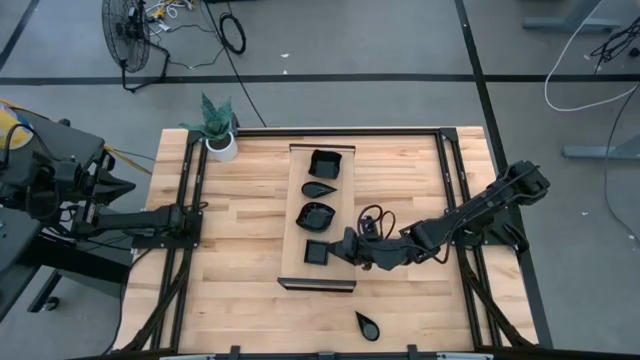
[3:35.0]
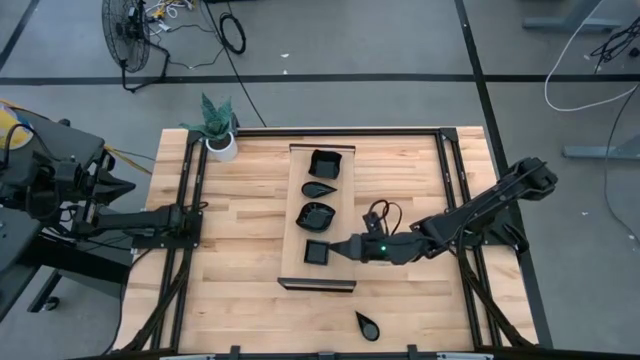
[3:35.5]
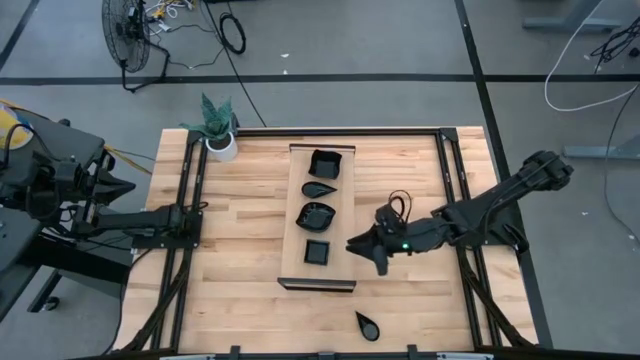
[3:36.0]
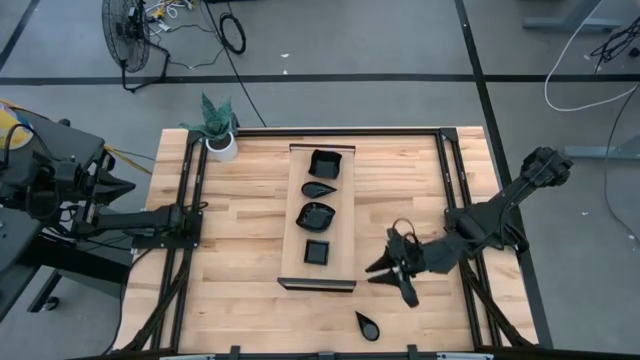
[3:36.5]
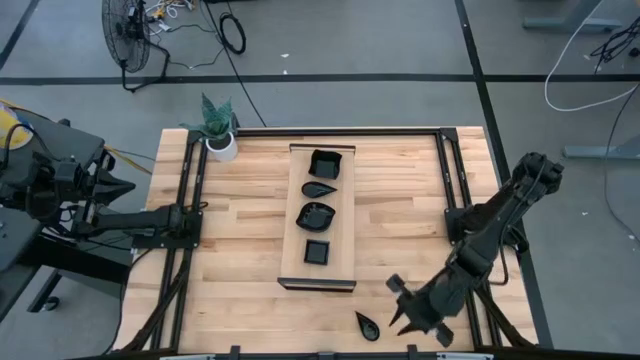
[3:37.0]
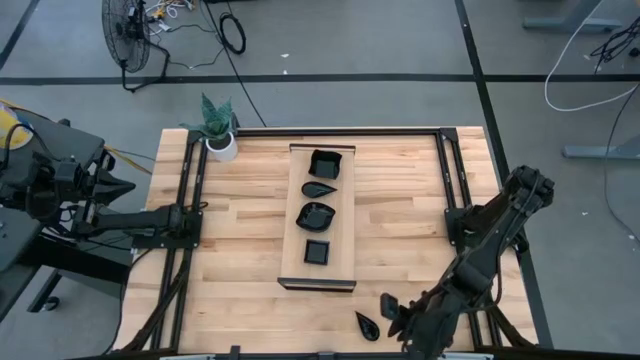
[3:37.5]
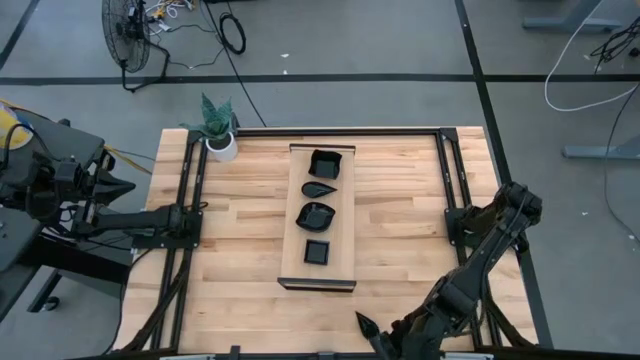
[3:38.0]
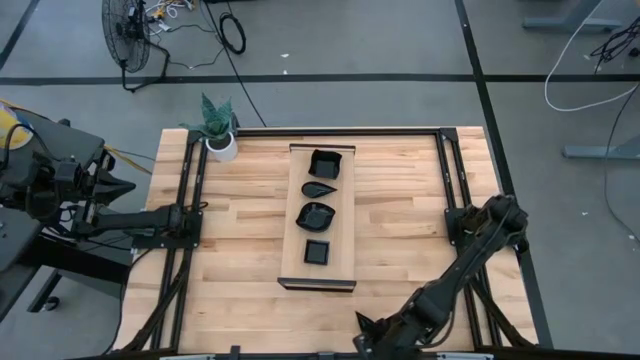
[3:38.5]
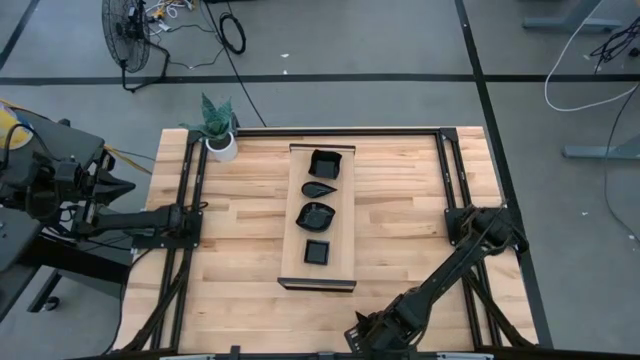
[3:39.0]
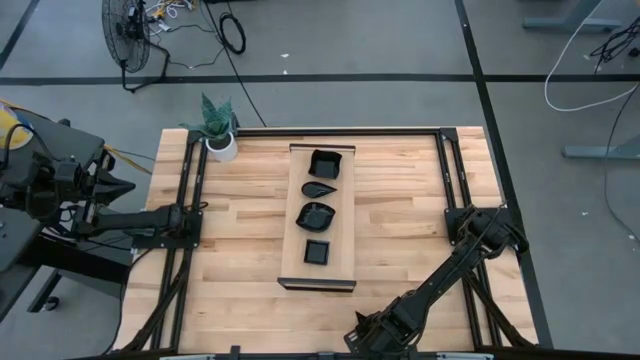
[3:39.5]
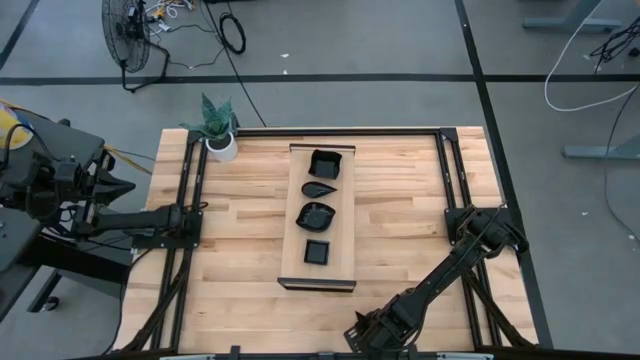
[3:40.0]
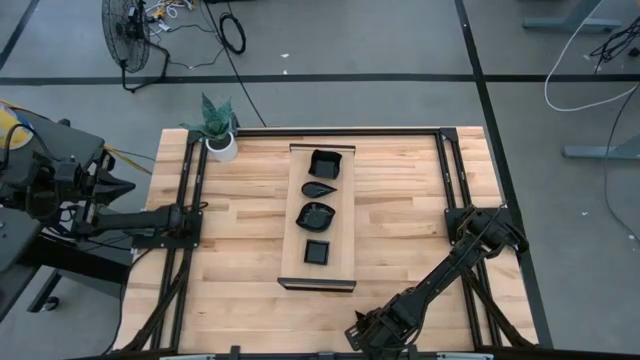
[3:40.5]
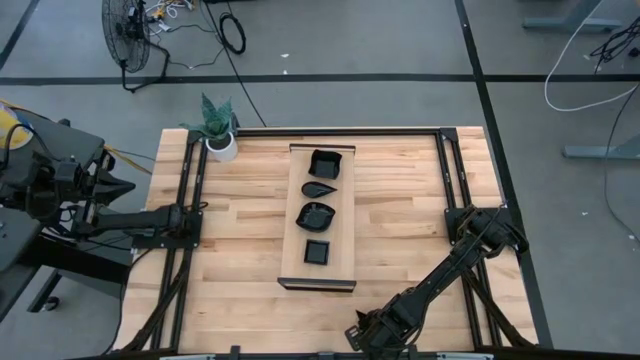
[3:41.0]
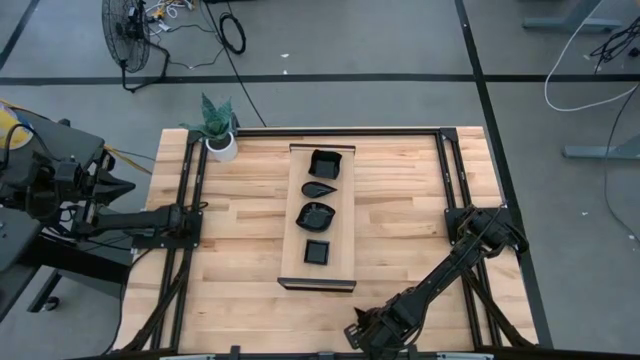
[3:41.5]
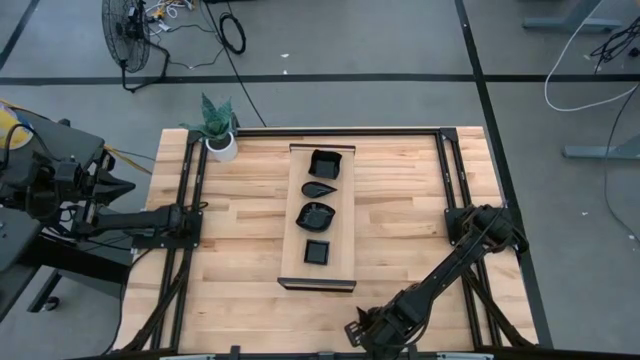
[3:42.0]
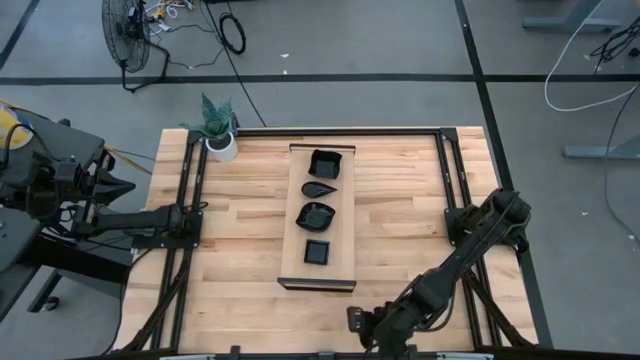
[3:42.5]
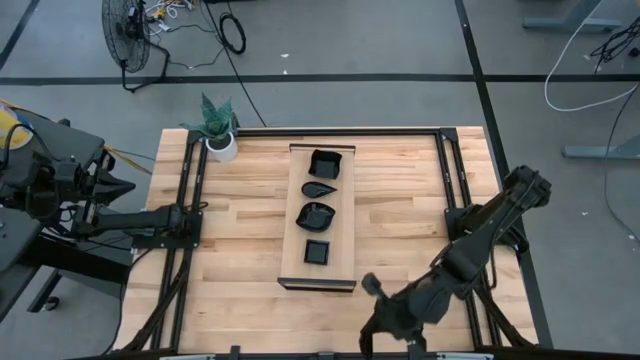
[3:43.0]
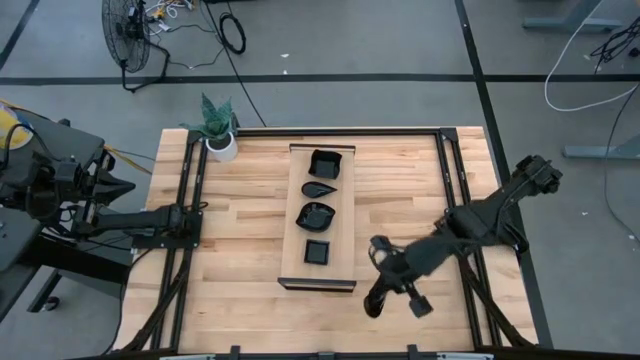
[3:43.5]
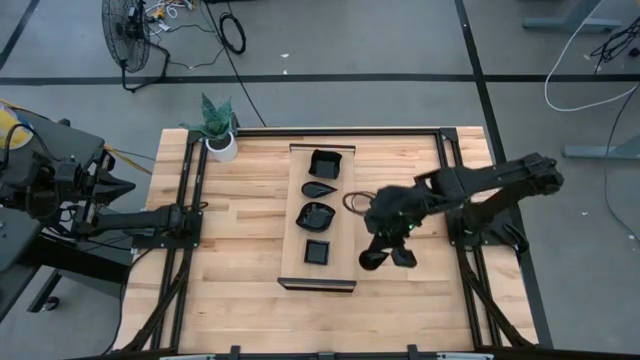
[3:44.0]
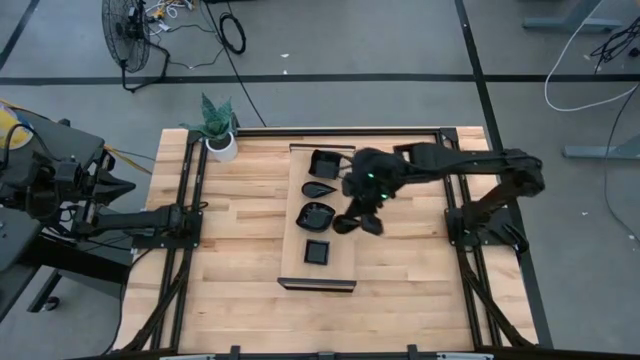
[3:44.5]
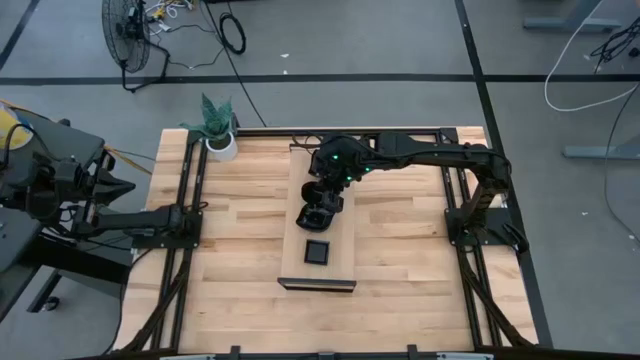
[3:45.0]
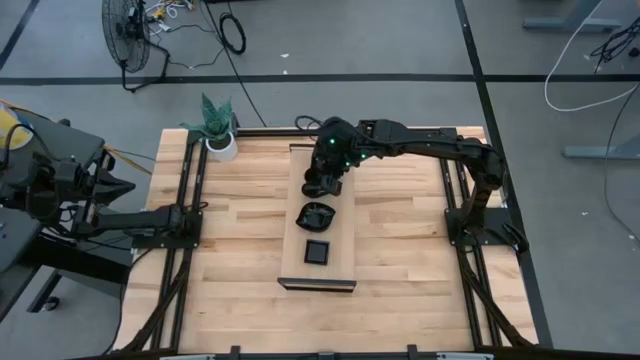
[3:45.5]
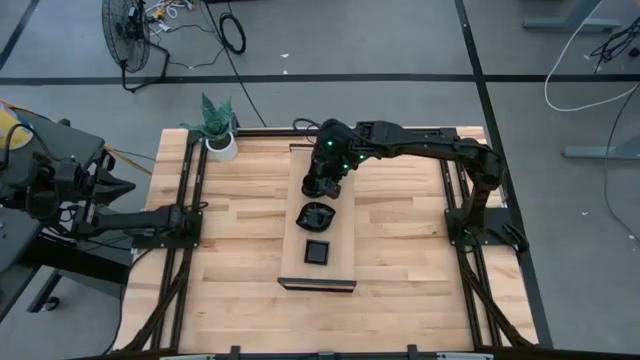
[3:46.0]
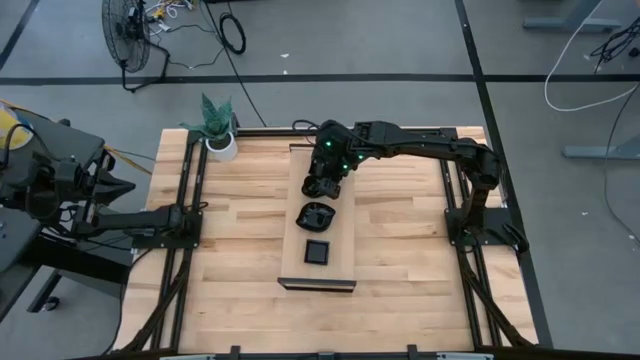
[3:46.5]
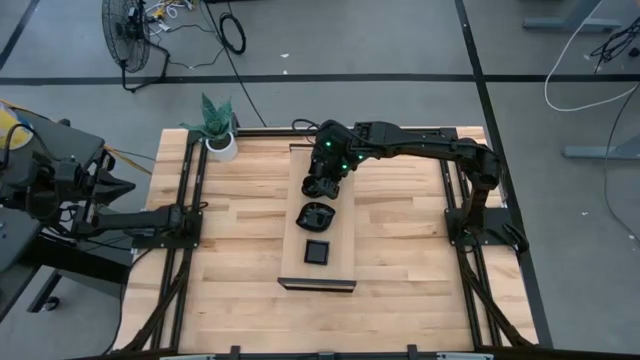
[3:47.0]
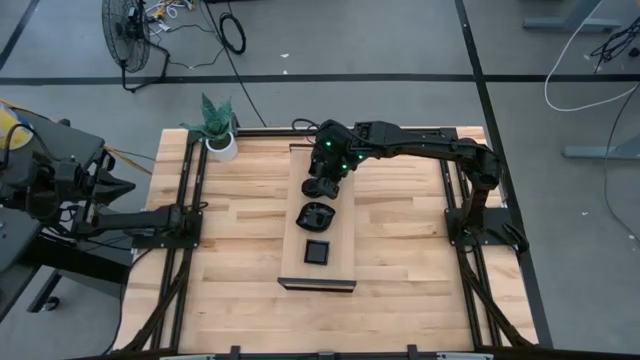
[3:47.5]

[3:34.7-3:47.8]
Task: Pick & Place Mini shaped plates
Stack the drop shaped plate on top of the drop shaped plate

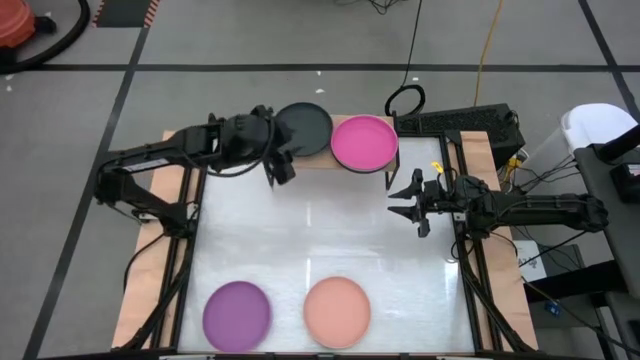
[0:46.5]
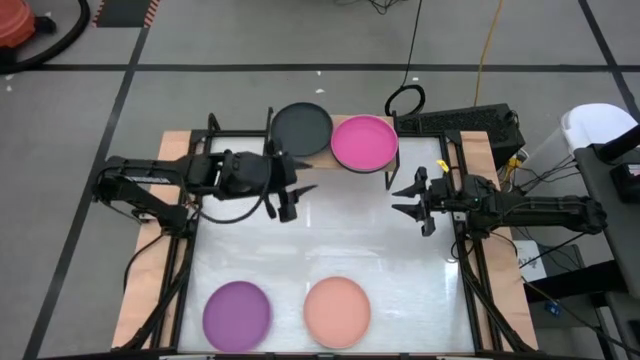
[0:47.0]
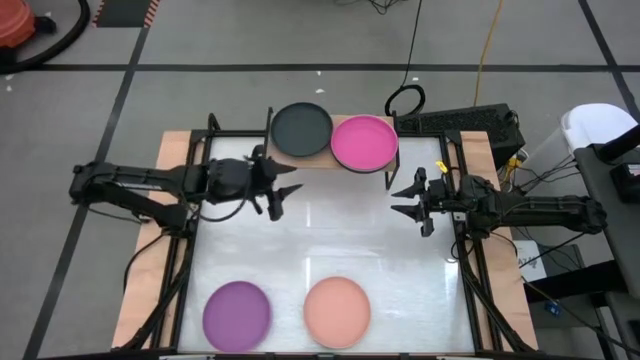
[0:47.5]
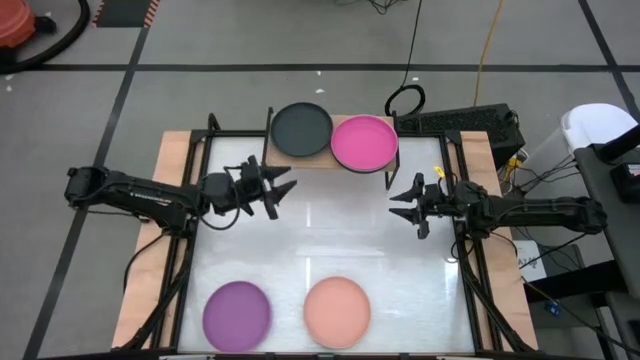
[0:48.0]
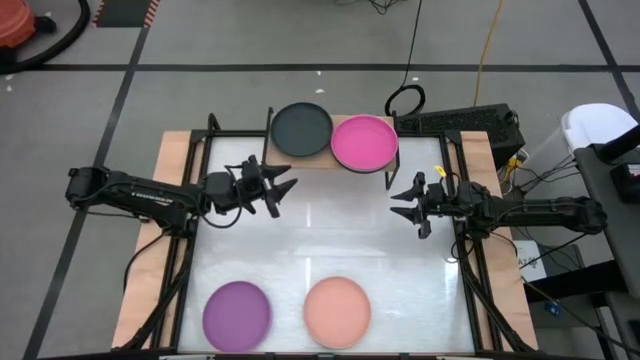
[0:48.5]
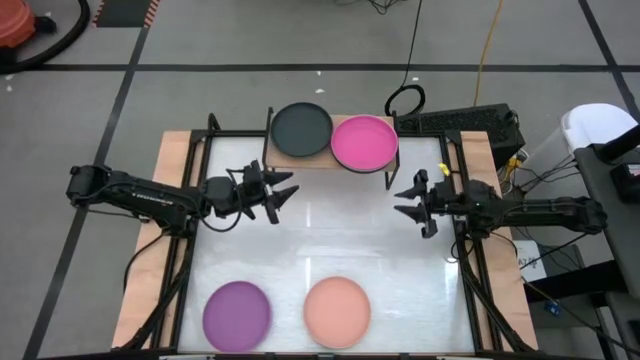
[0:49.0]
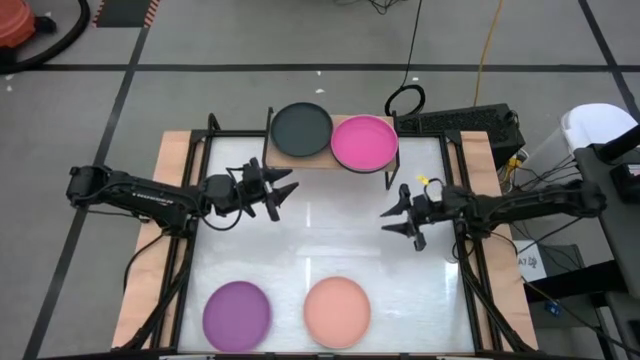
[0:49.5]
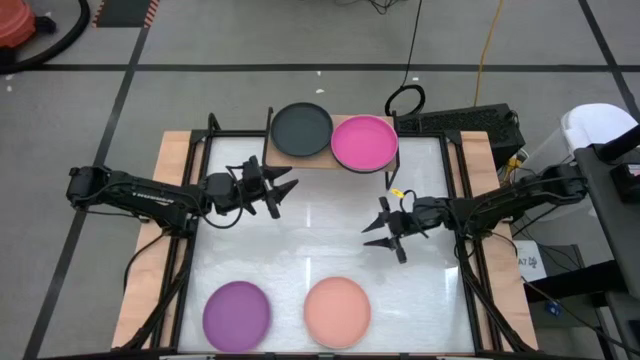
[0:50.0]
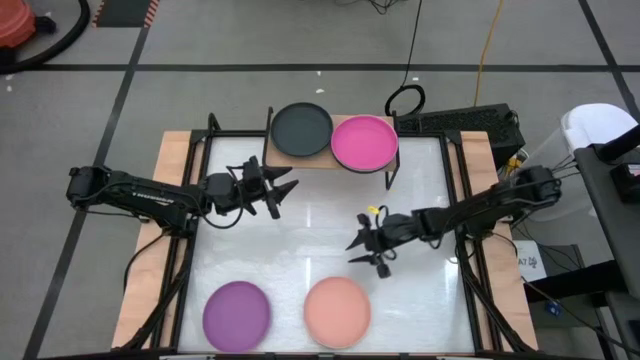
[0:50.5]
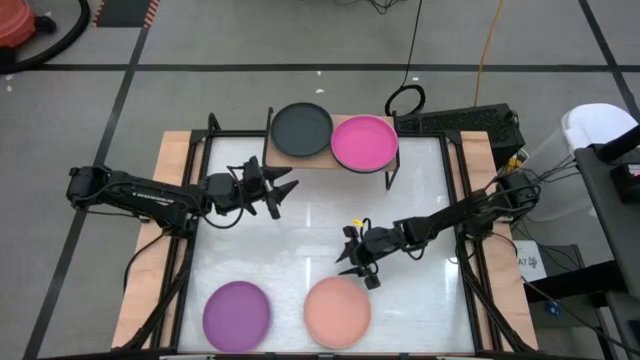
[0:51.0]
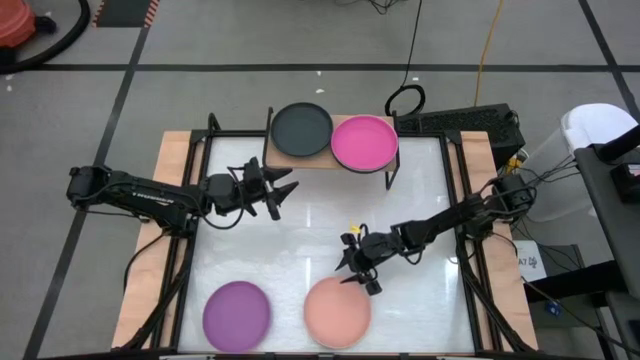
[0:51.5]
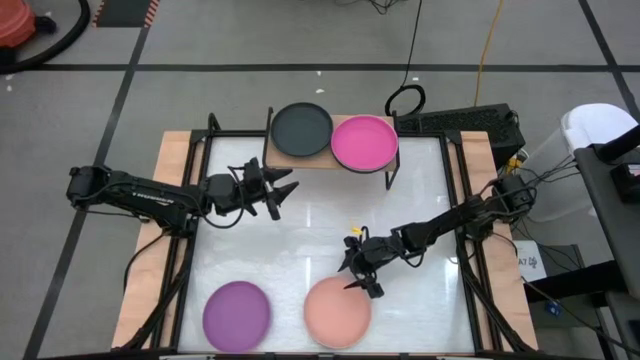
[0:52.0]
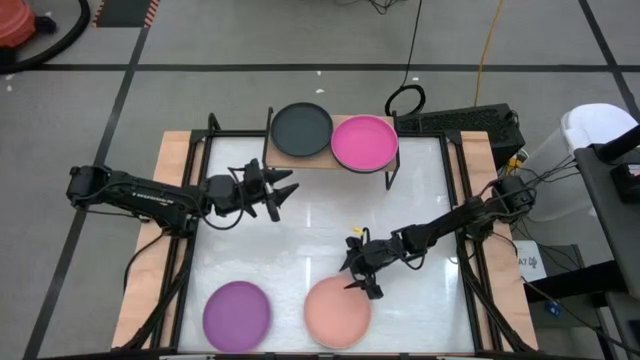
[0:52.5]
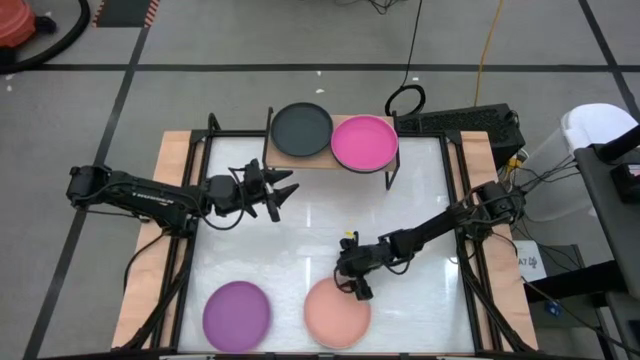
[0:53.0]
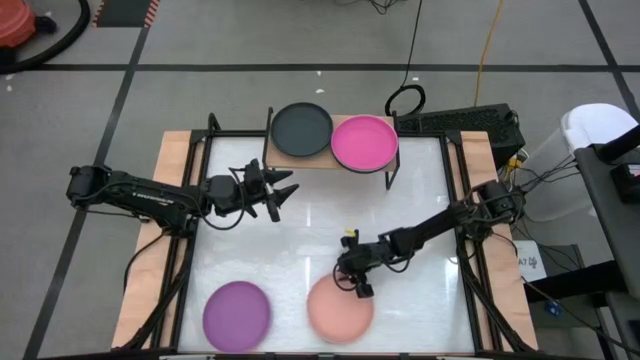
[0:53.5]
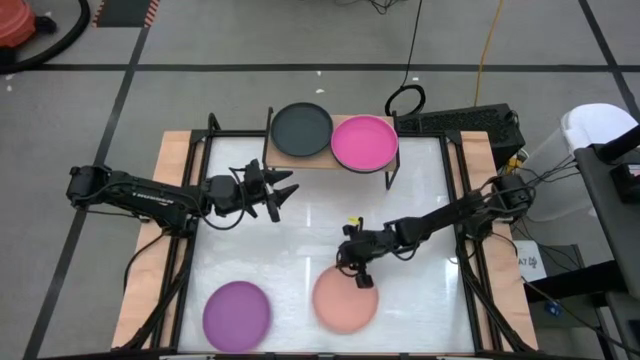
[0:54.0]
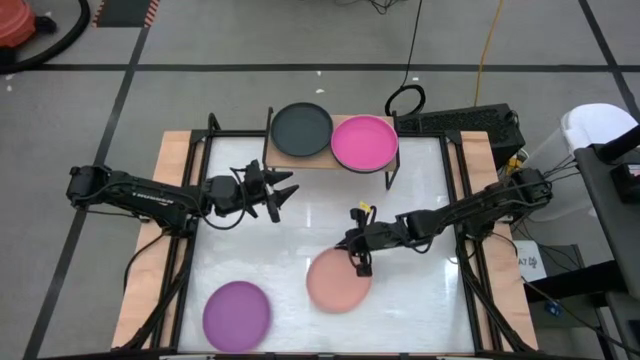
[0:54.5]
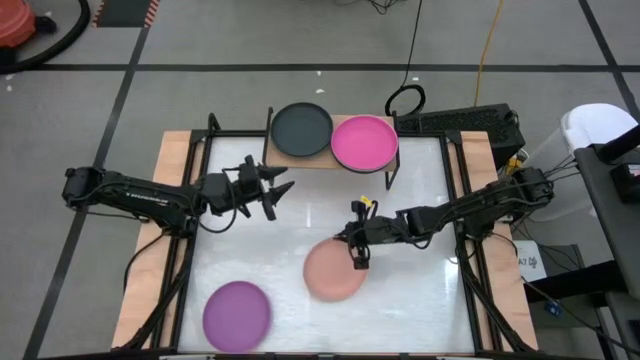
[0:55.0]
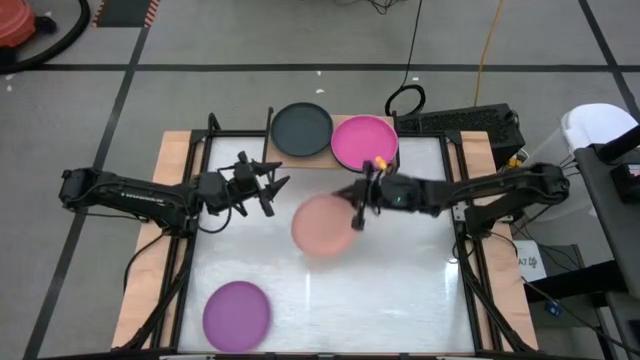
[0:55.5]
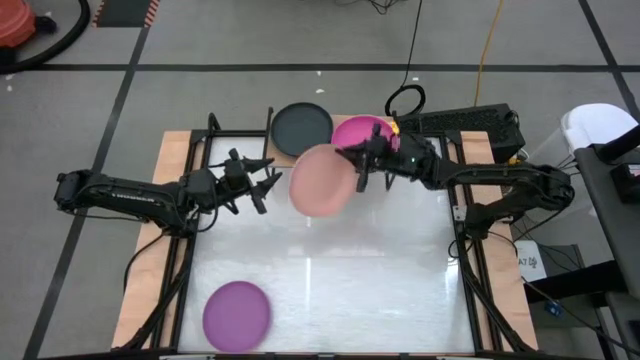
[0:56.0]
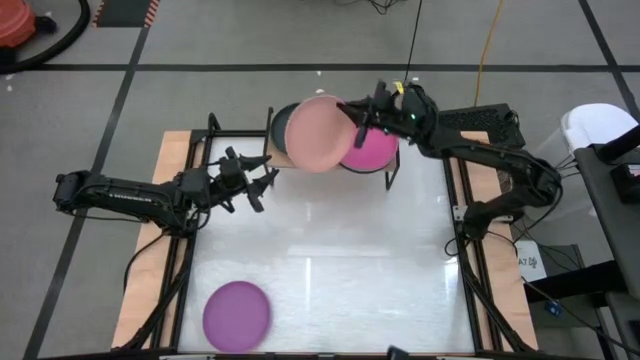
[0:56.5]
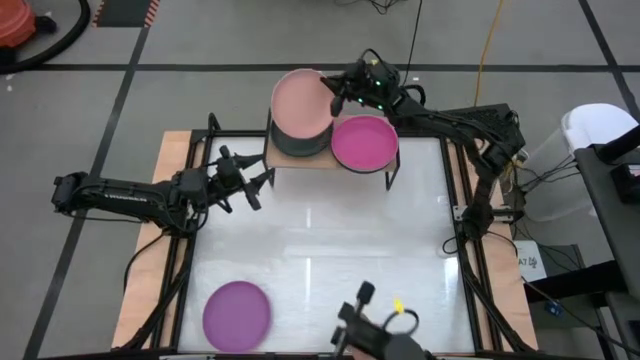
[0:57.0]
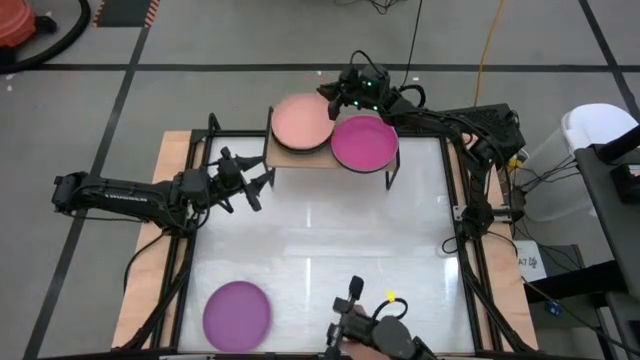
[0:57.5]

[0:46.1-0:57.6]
Task: Place and stack plates onto a shelf
Stack the orange plate on top of the black plate on the shelf
